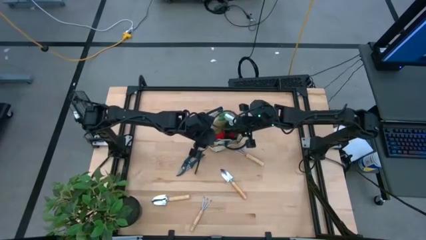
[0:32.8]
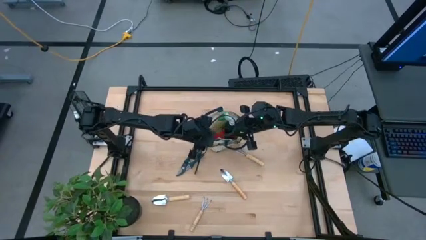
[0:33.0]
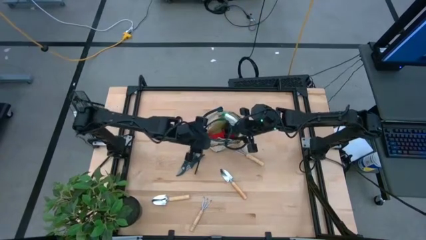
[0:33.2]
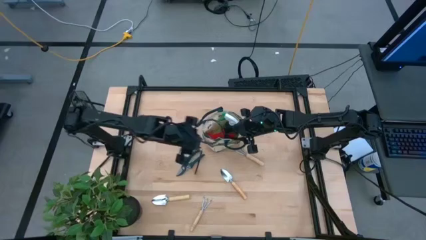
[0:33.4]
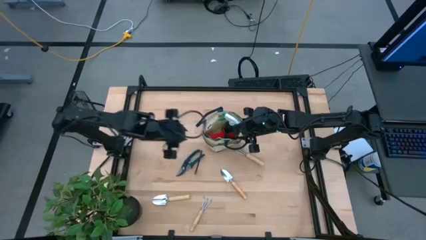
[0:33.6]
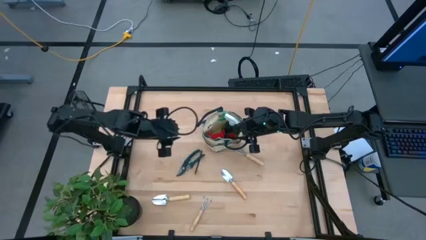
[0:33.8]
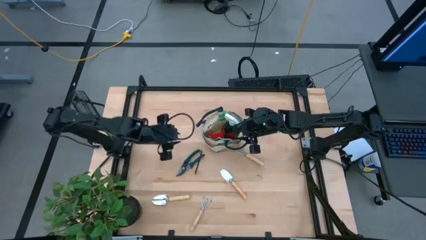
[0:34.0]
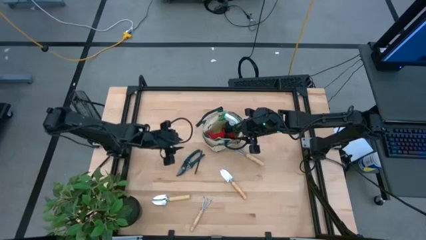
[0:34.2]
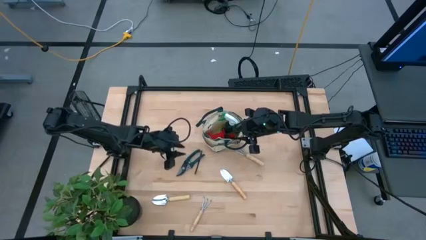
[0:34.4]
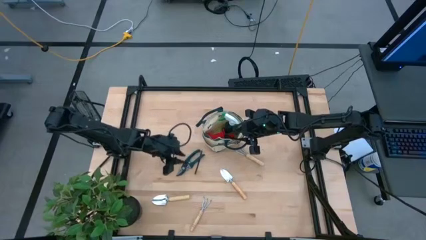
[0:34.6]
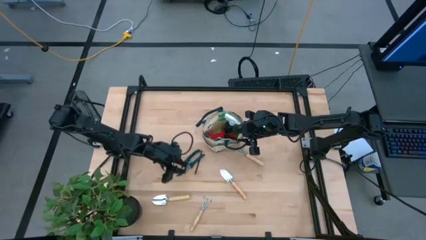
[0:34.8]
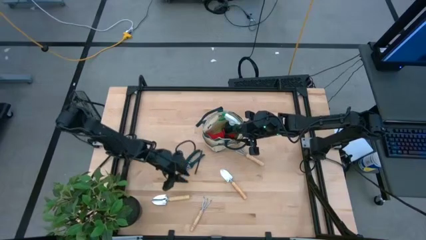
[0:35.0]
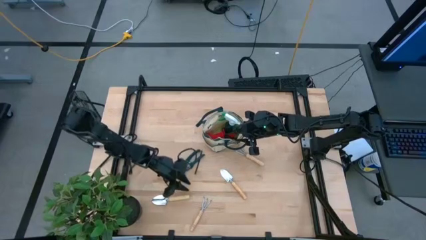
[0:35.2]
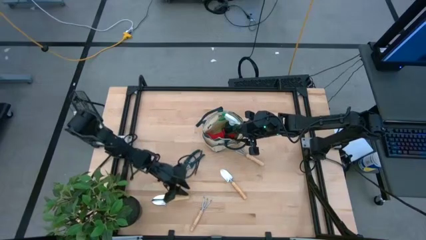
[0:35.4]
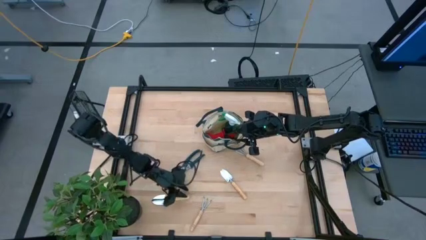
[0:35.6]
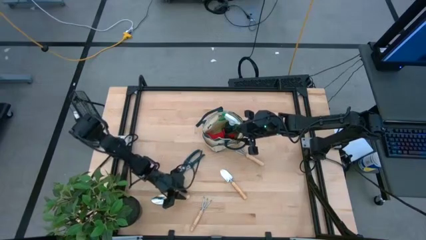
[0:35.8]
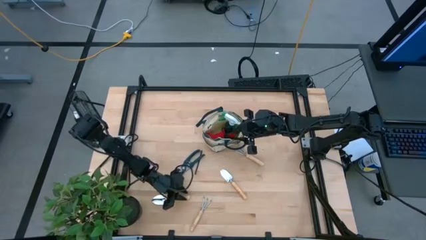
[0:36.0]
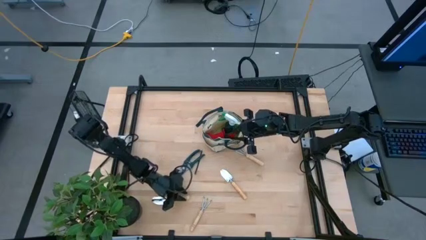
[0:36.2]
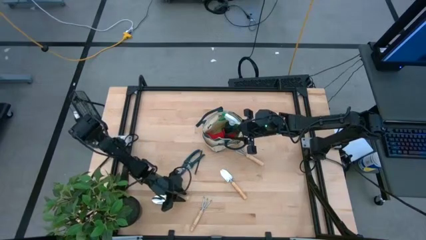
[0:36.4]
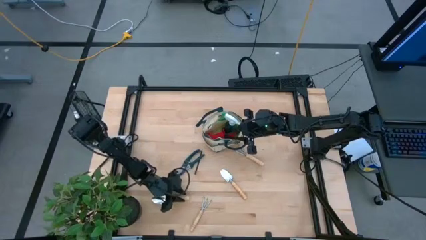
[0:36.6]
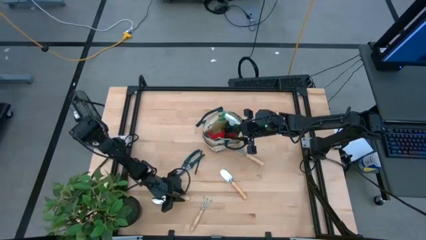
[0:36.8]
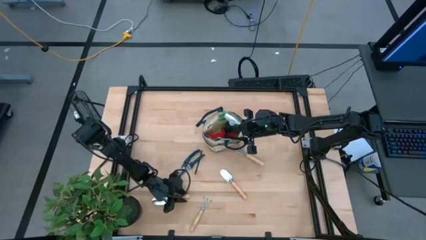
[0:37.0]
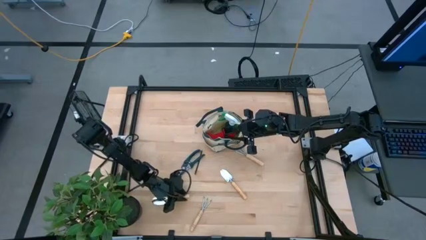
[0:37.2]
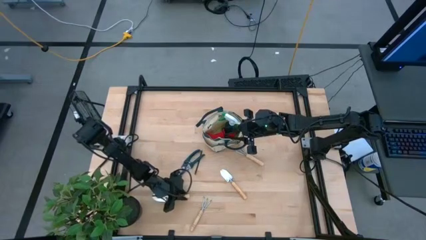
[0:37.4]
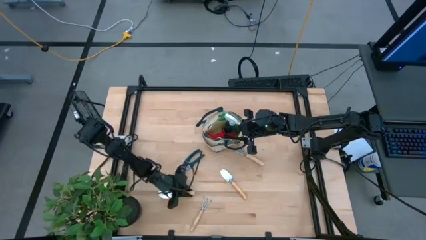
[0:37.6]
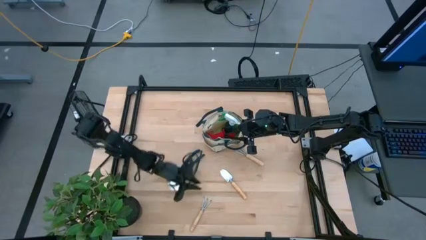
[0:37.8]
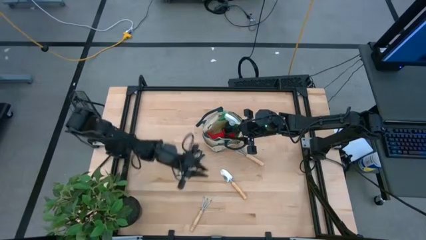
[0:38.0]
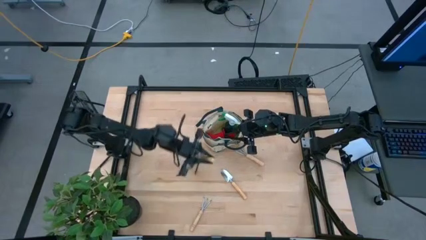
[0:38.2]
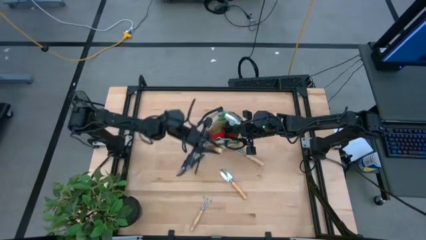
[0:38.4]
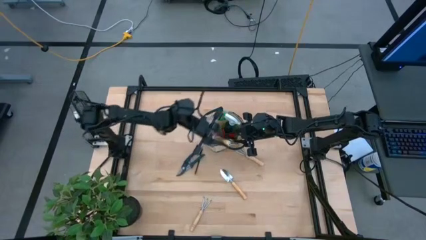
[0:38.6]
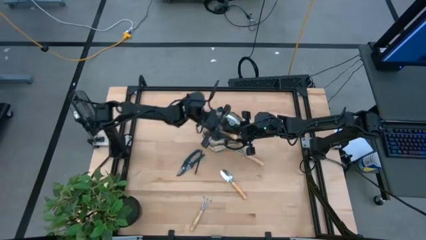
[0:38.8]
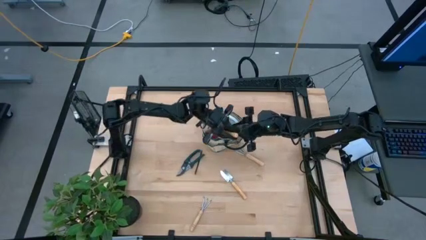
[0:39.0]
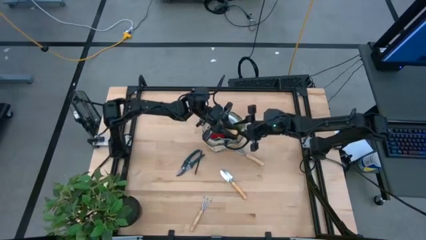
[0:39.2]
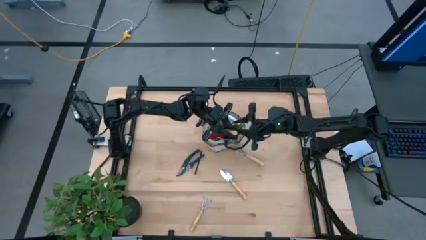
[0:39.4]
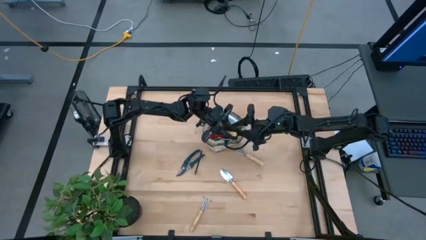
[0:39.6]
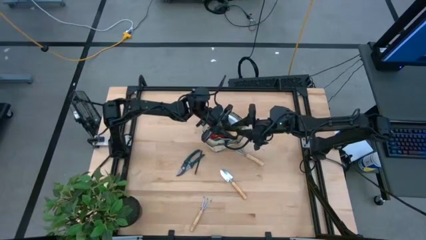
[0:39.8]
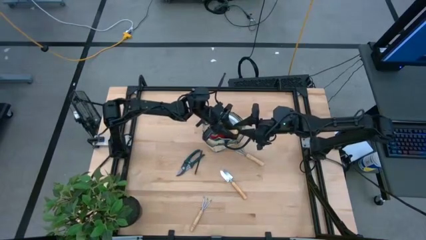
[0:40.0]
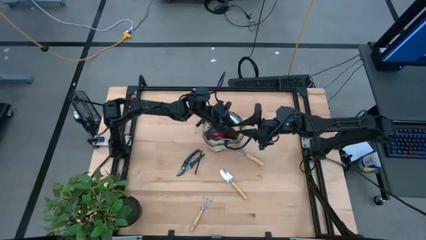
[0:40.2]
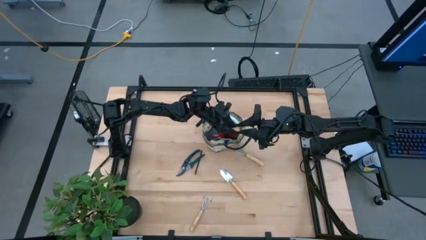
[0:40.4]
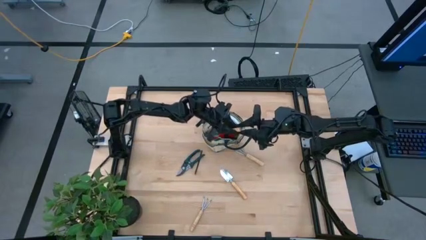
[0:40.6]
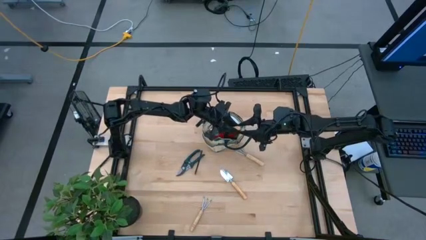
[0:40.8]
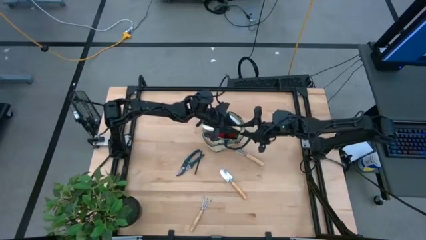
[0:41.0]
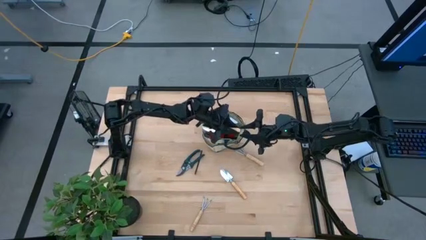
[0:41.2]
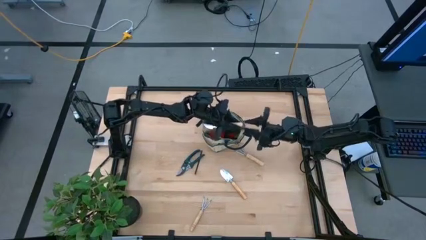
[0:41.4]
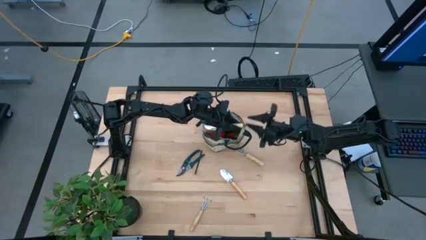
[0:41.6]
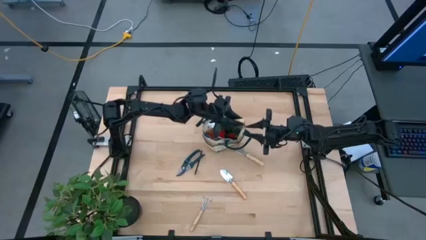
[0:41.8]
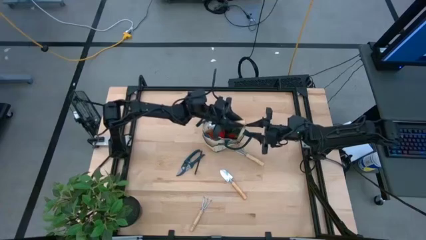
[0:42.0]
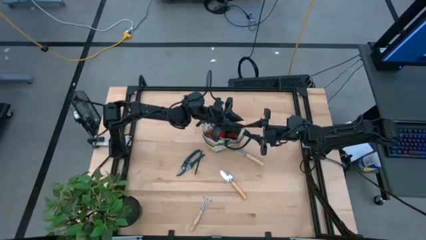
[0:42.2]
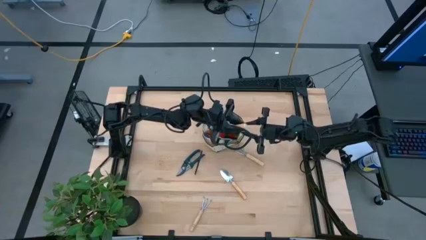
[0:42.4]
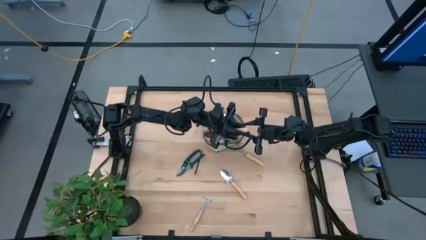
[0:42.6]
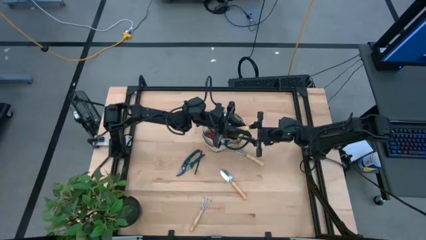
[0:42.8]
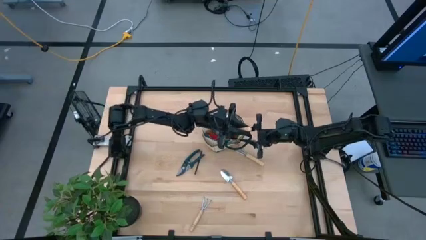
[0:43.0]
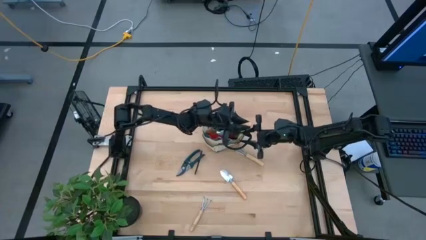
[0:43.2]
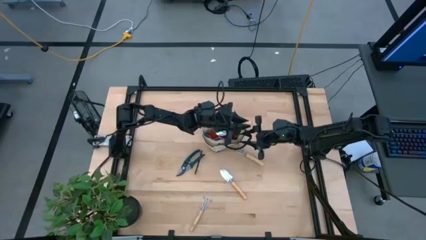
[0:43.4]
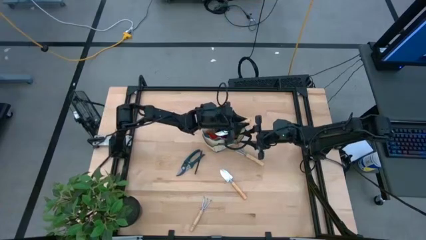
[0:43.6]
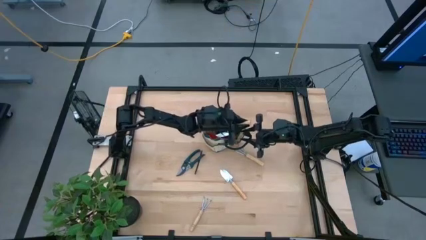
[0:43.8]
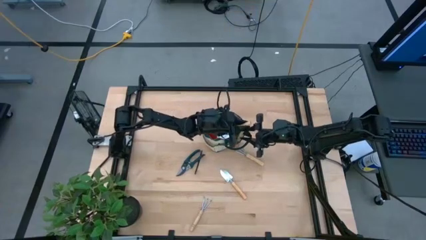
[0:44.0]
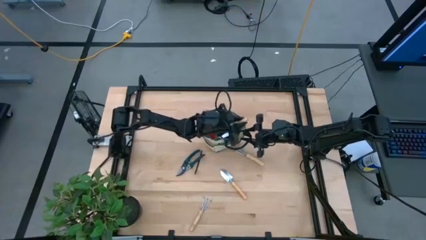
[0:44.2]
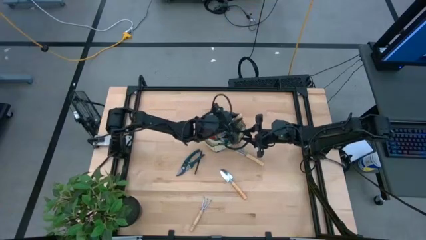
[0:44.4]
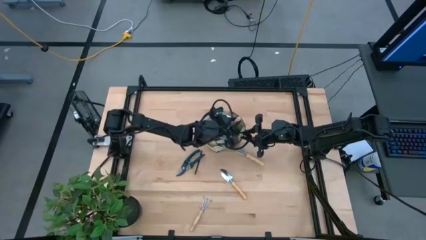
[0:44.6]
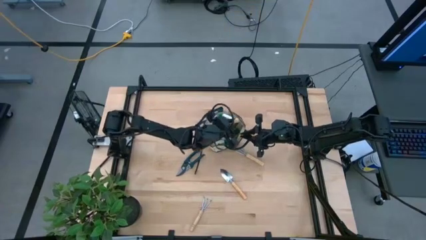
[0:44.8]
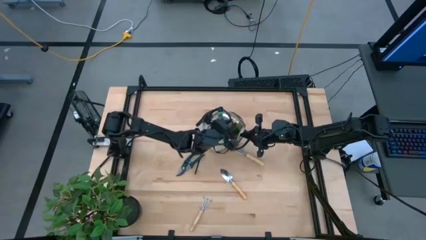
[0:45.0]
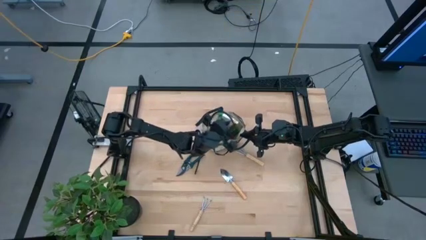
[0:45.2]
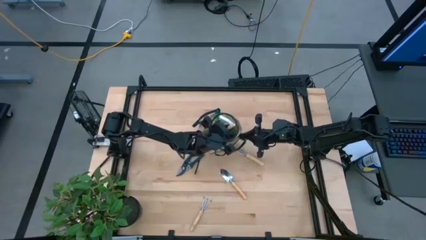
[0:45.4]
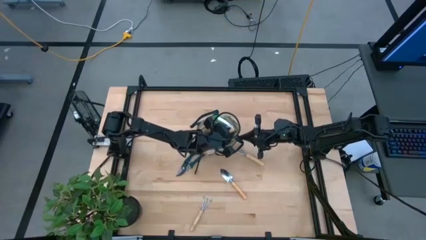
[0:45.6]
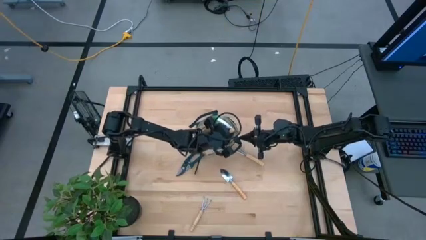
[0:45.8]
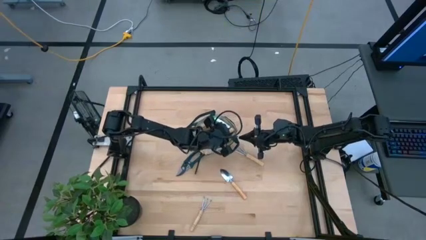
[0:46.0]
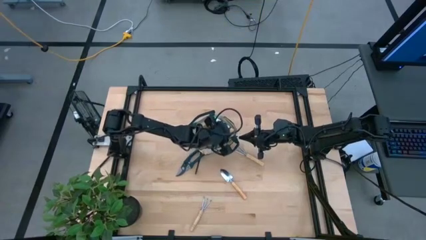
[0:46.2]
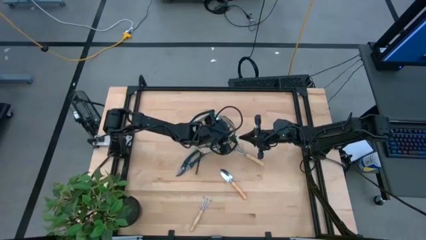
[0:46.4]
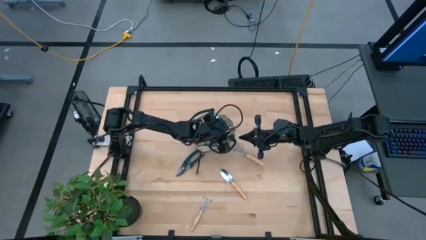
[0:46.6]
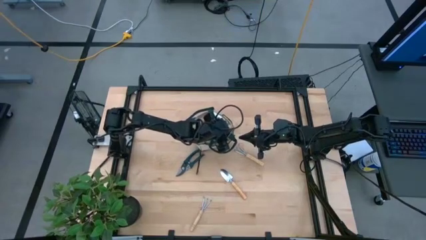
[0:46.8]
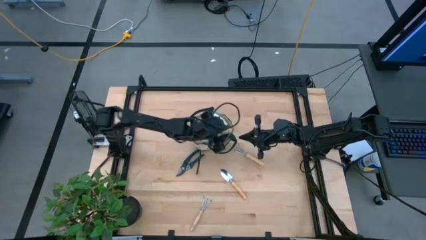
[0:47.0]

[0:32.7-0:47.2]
Task: Pick & Place Garden tools in Gardening bag
Put the left trowel into the gardening bag
